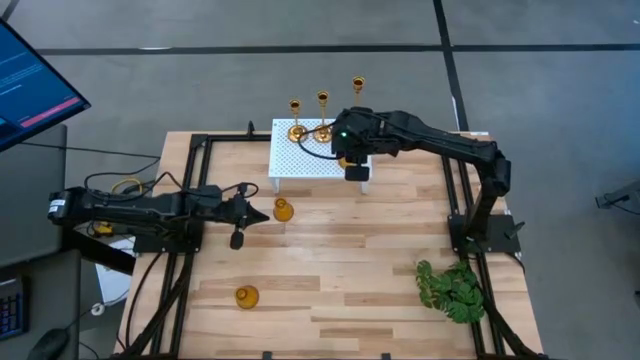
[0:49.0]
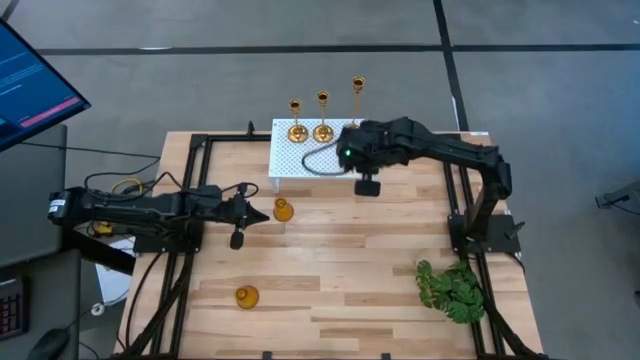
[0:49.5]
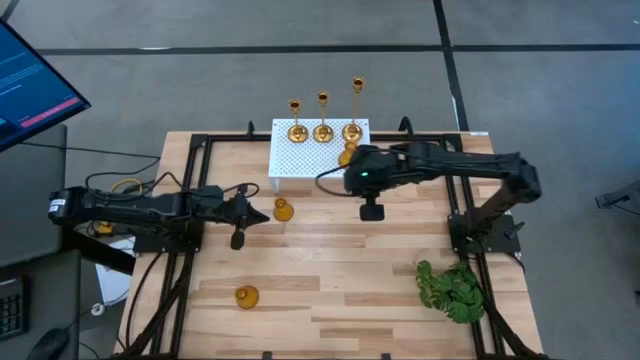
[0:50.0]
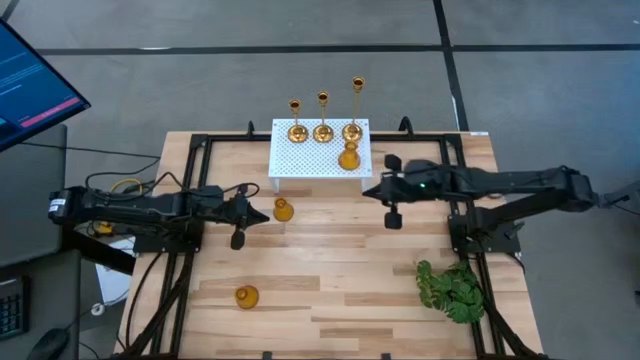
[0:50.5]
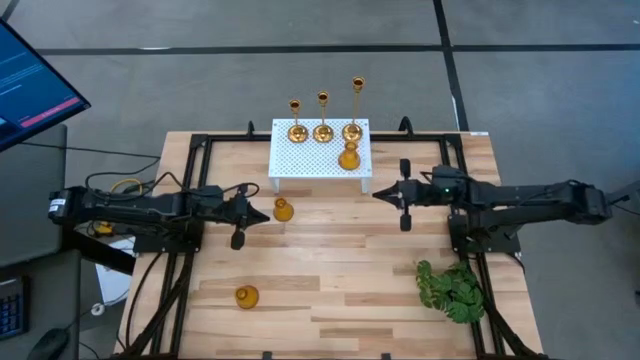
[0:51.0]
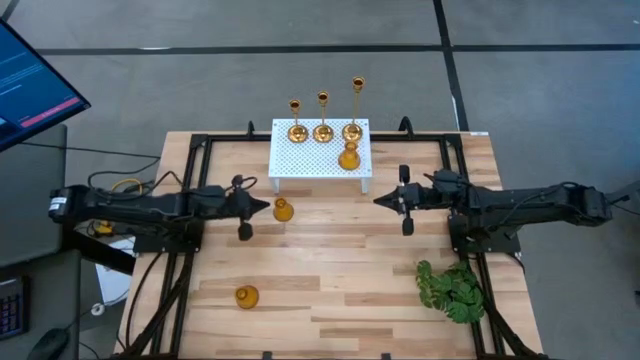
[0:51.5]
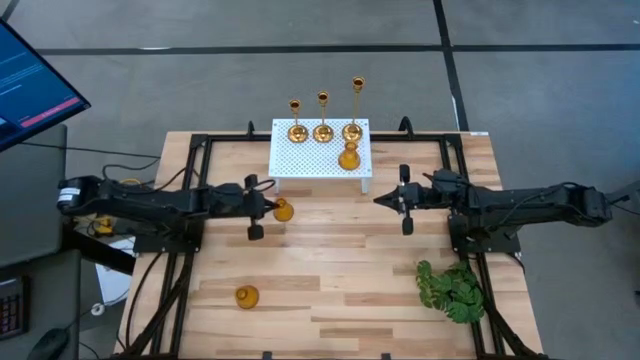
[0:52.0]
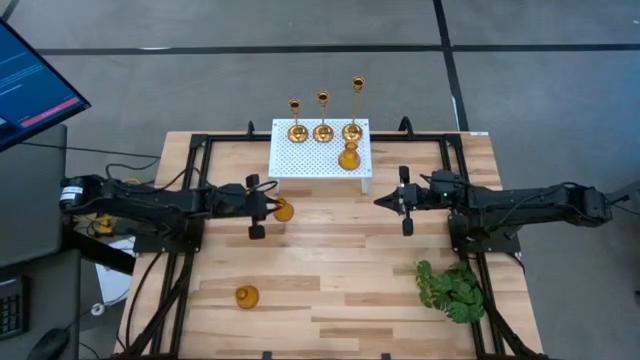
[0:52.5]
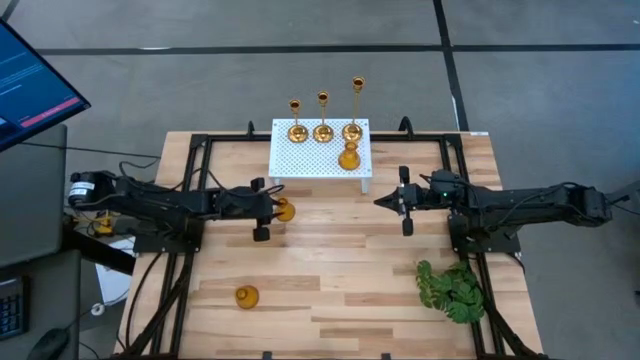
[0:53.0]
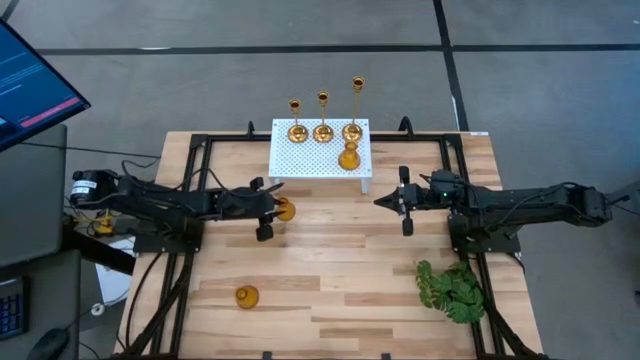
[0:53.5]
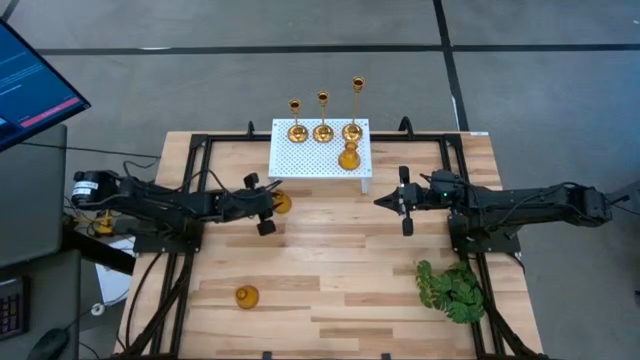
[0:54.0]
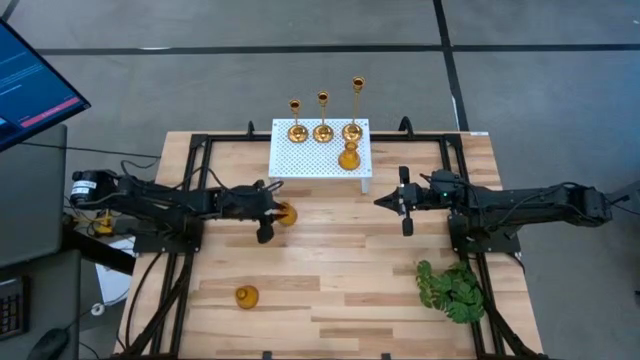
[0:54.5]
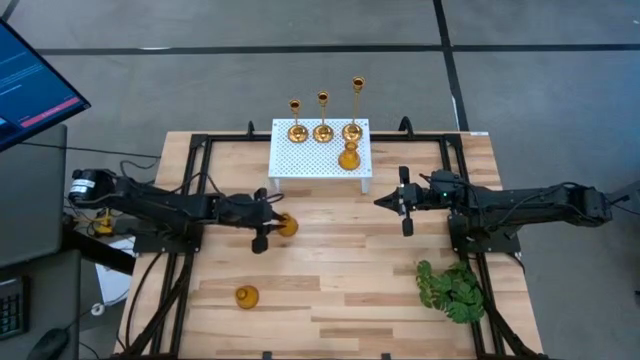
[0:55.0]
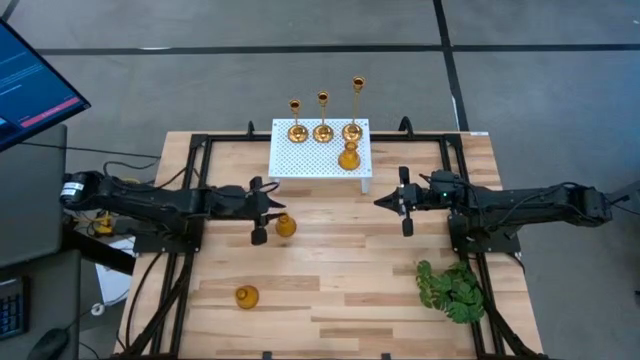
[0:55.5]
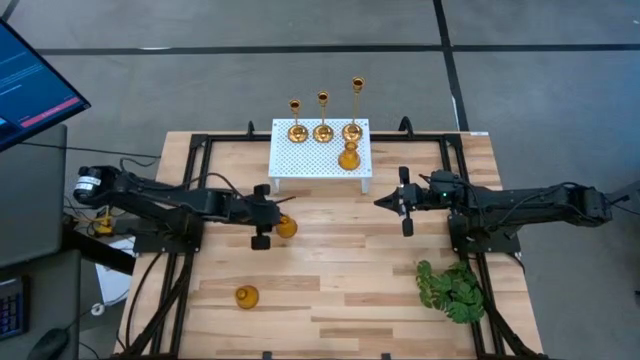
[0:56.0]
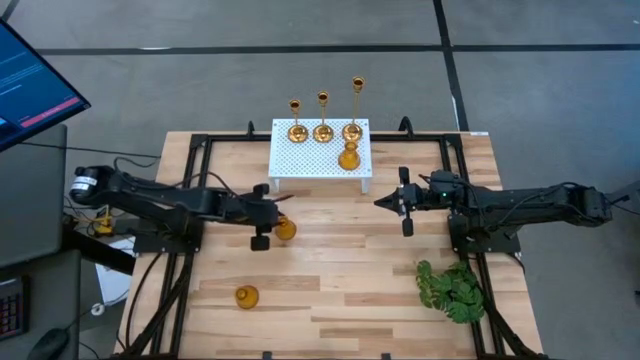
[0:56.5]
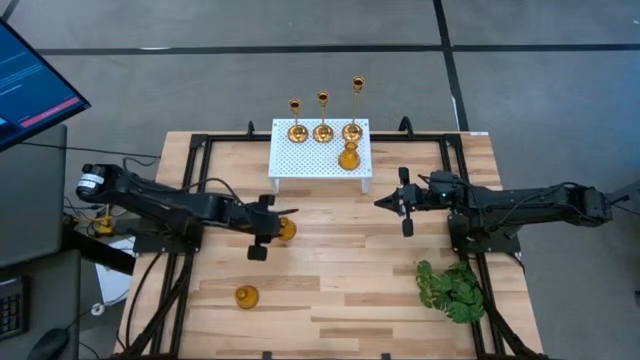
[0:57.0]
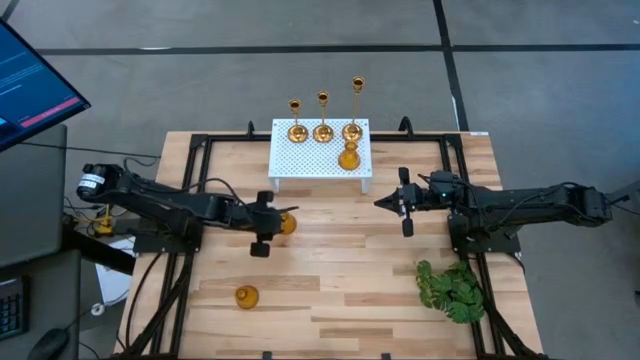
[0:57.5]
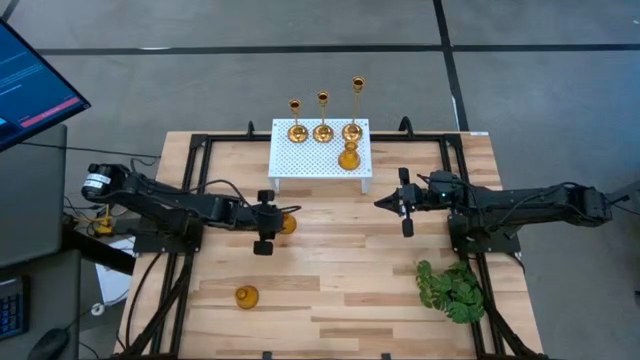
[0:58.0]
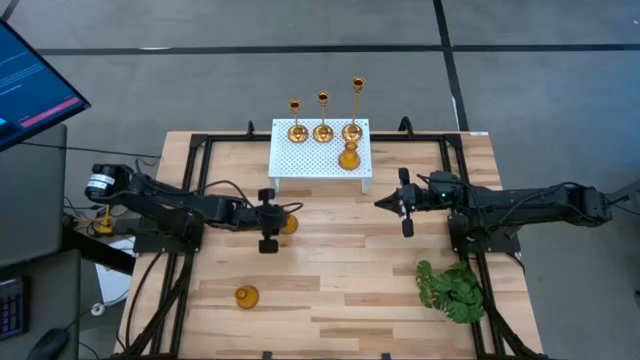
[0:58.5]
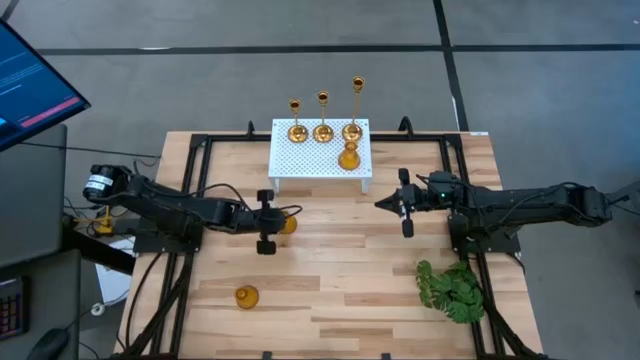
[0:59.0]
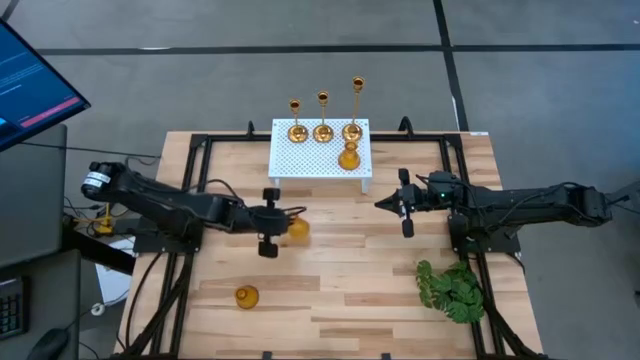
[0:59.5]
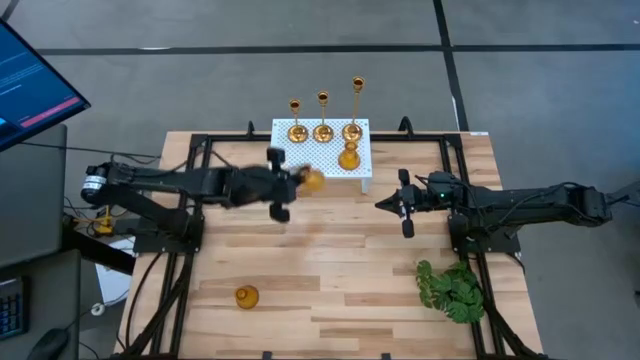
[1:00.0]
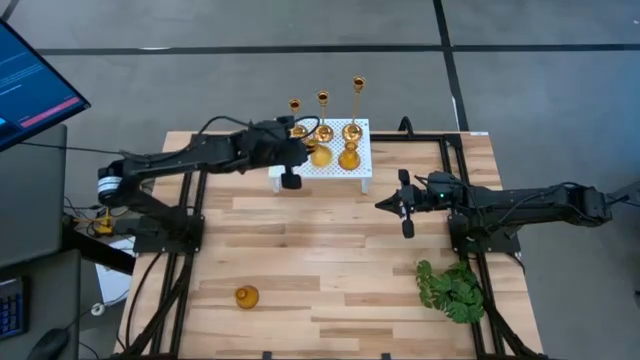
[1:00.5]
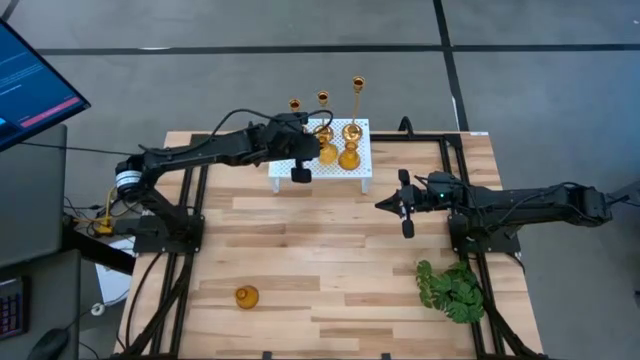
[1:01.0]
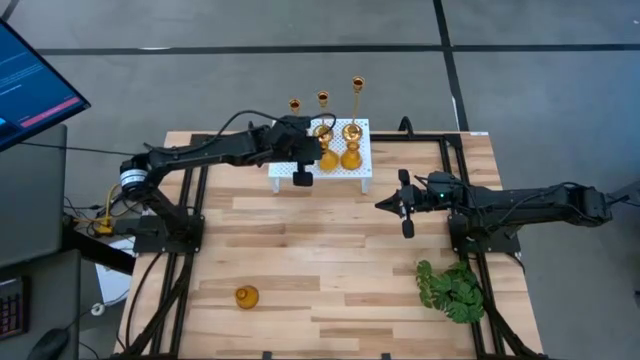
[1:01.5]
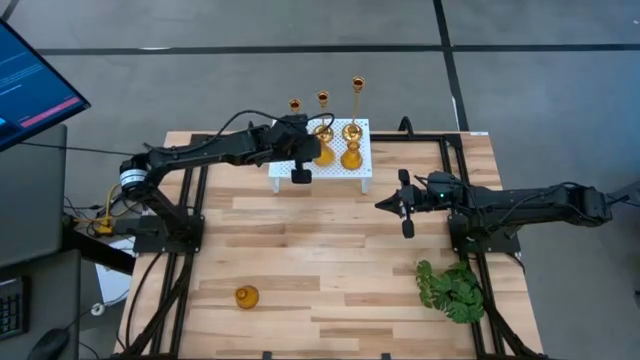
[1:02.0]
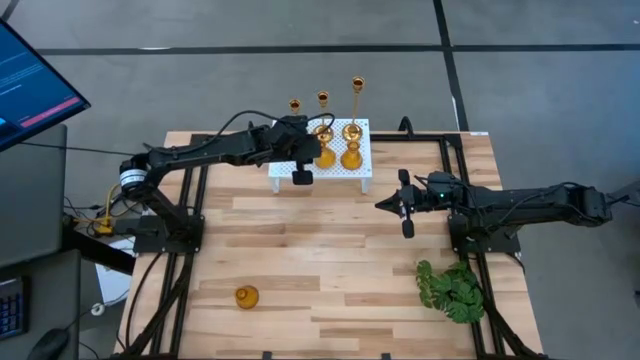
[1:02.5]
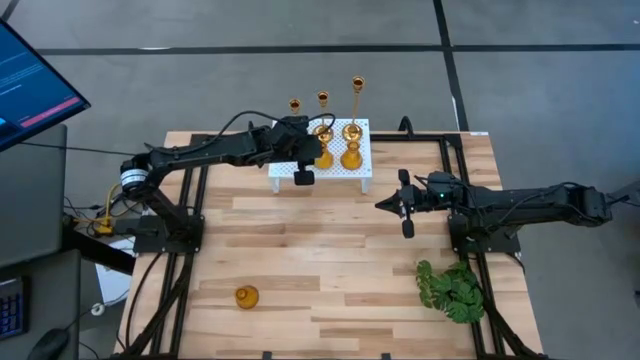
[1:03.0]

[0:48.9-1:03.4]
Task: Pick & Place candle stick holders
Put the top orange candle holder on the shelf

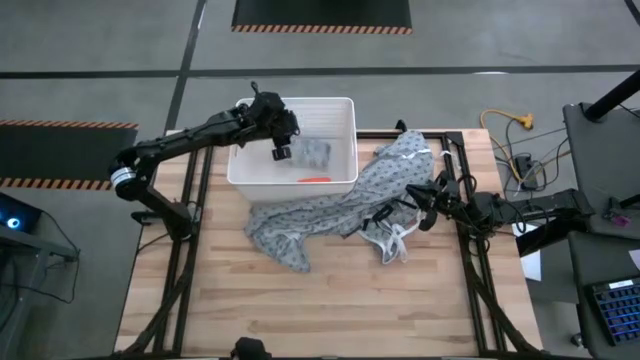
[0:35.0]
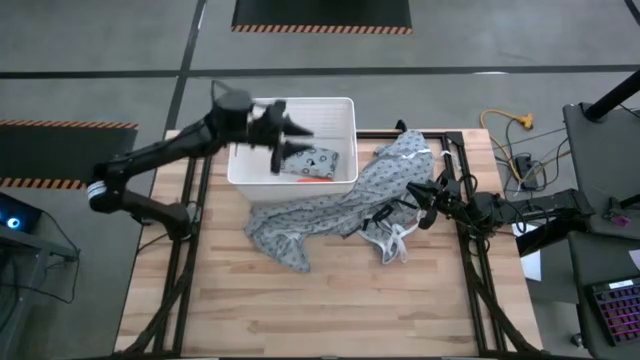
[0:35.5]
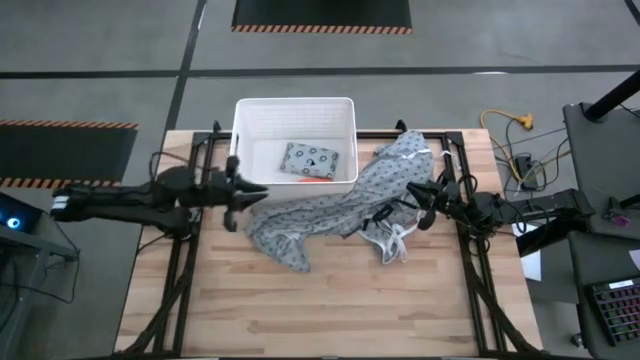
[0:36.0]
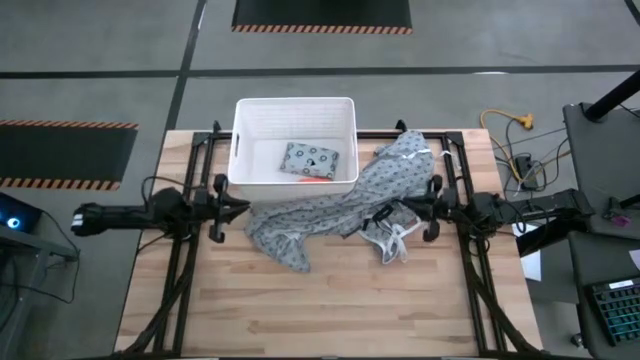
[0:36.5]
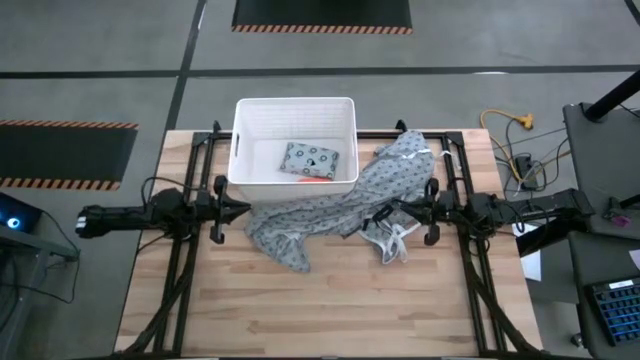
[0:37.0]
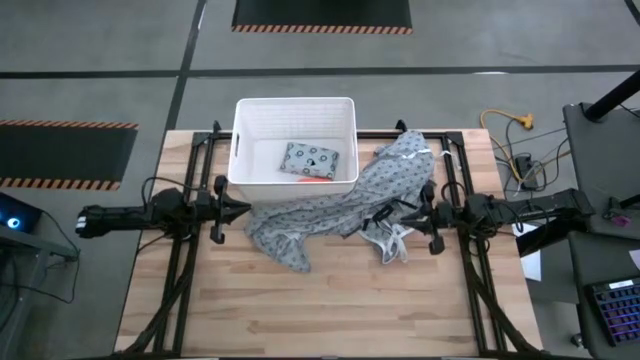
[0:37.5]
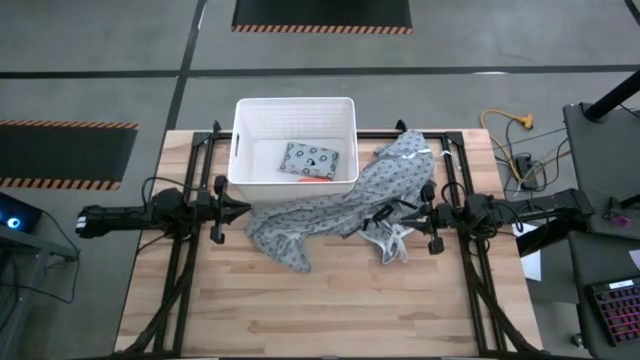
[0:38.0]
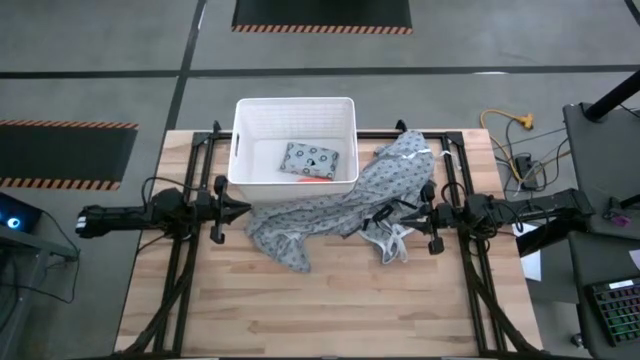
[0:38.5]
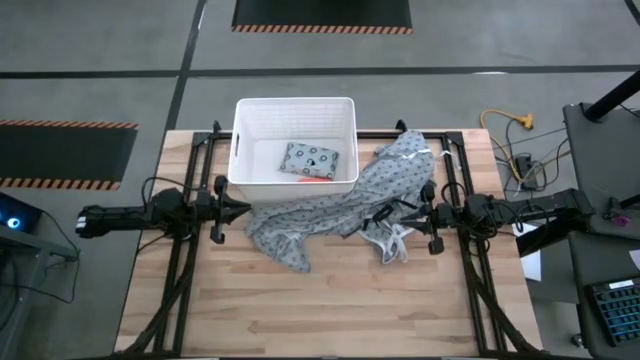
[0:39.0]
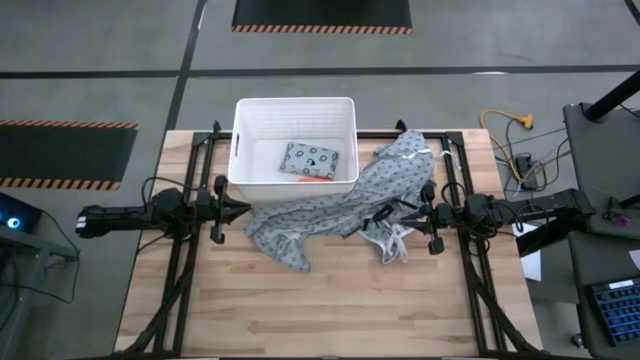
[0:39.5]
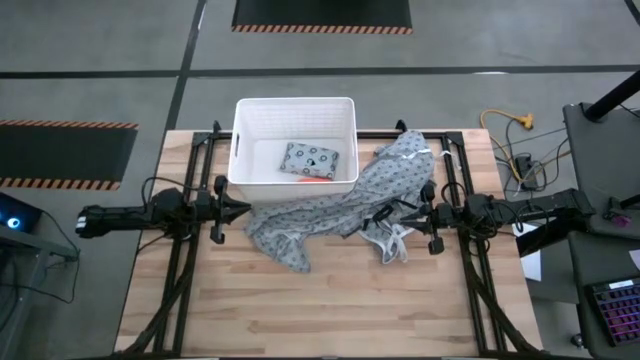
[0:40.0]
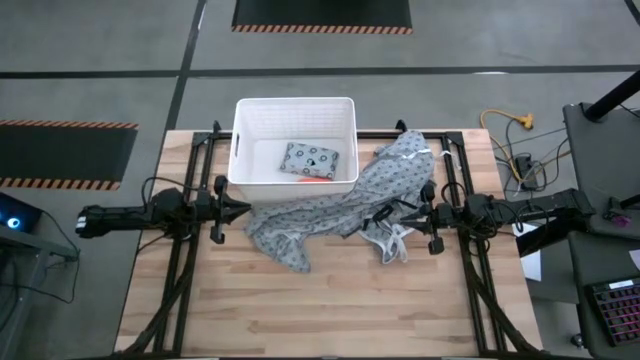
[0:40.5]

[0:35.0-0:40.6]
Task: Pick & place medical supplies in basket/bin
Return to Home Position
